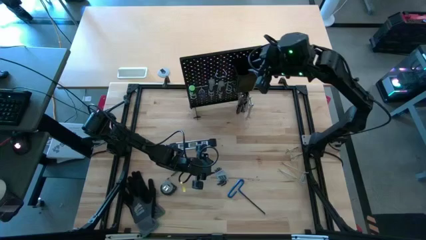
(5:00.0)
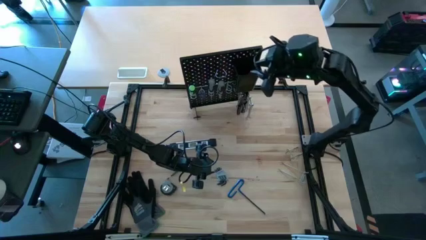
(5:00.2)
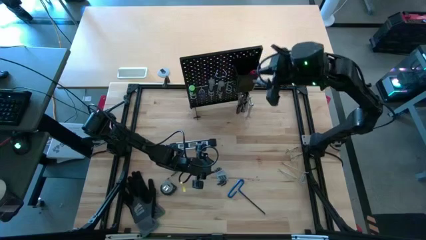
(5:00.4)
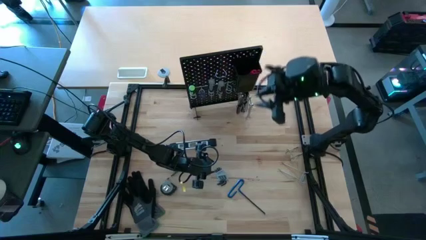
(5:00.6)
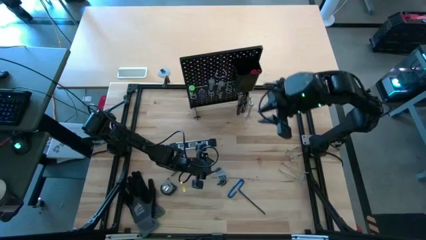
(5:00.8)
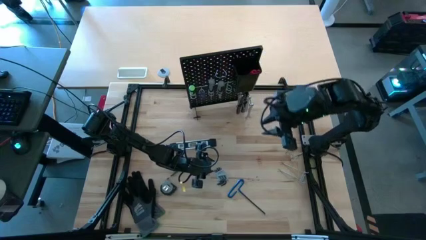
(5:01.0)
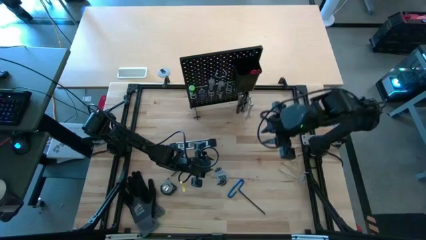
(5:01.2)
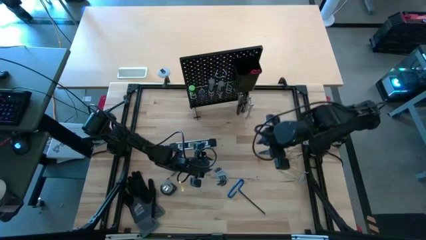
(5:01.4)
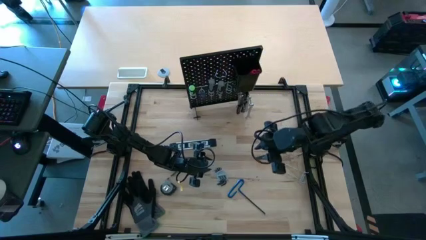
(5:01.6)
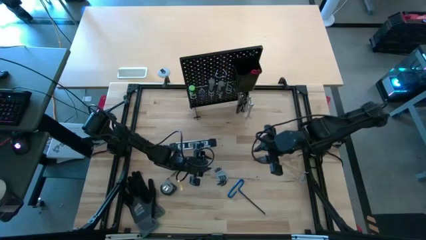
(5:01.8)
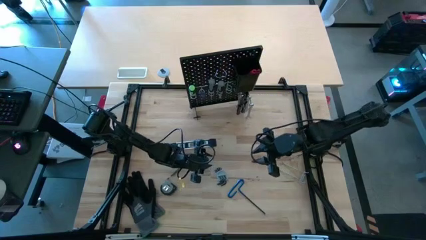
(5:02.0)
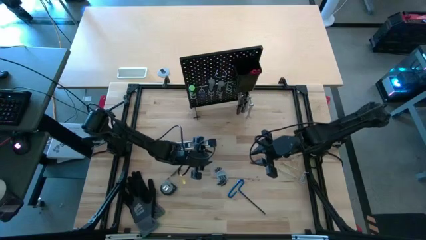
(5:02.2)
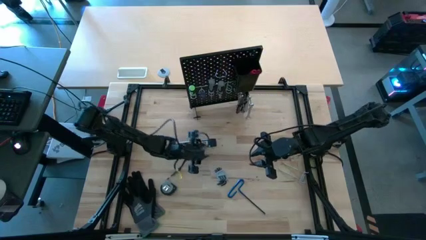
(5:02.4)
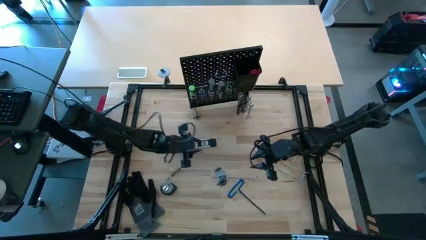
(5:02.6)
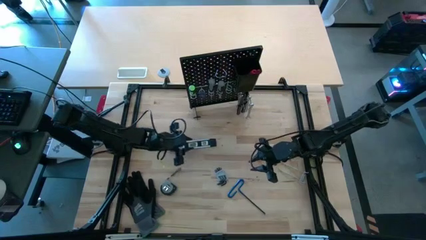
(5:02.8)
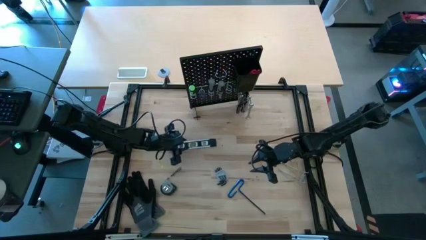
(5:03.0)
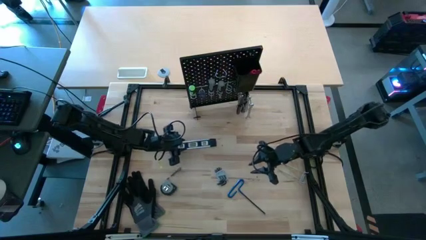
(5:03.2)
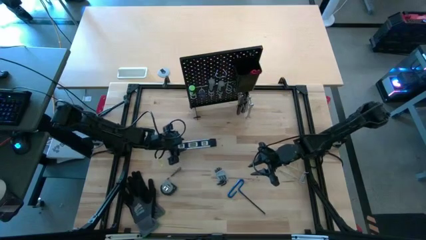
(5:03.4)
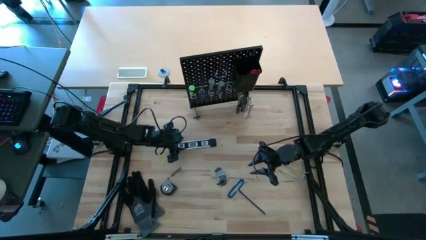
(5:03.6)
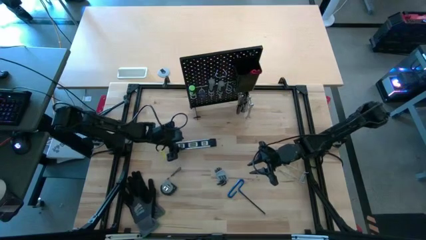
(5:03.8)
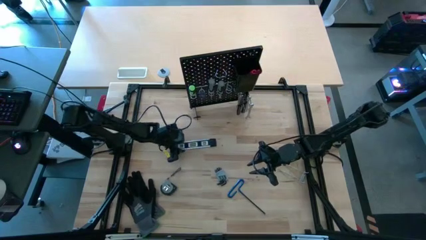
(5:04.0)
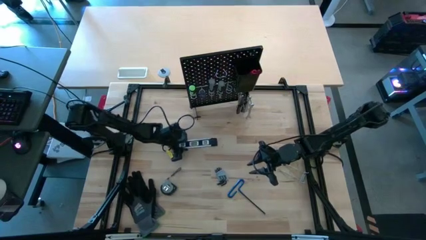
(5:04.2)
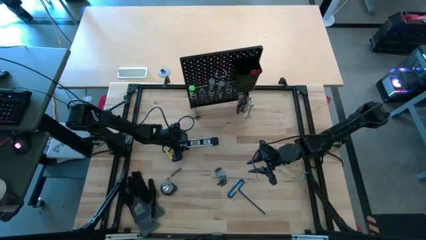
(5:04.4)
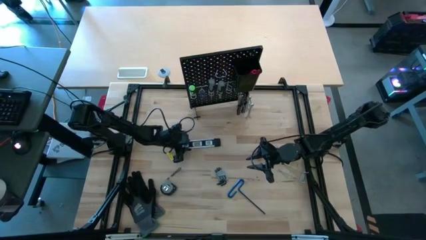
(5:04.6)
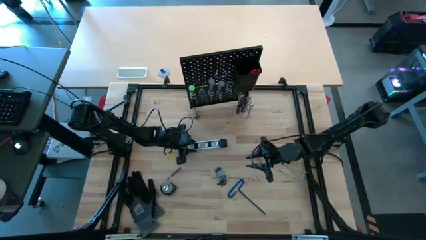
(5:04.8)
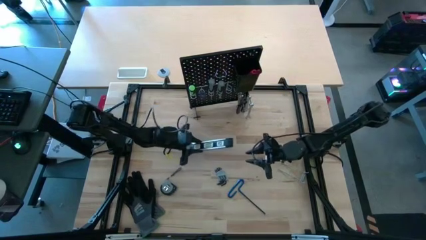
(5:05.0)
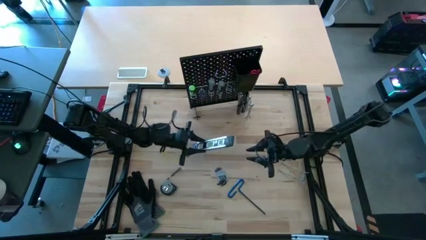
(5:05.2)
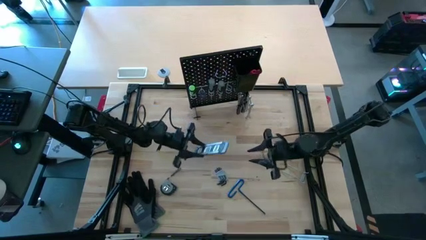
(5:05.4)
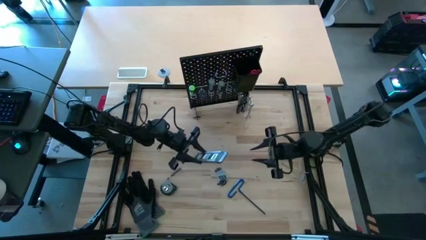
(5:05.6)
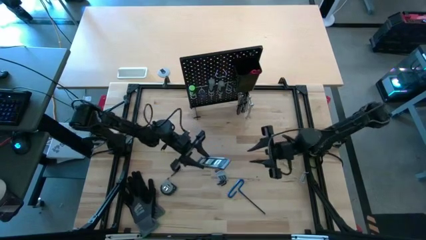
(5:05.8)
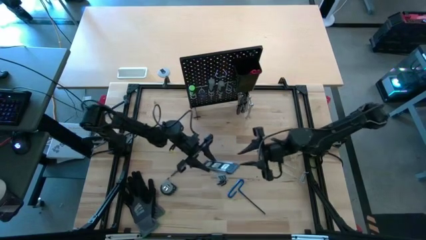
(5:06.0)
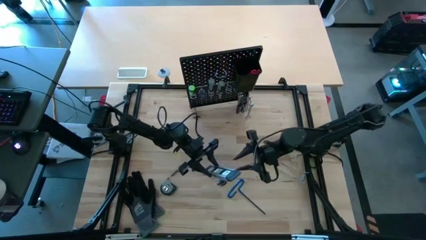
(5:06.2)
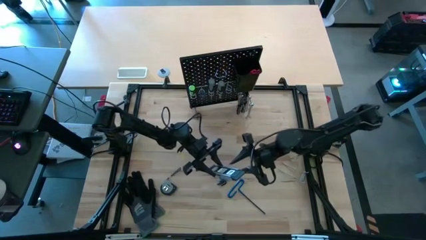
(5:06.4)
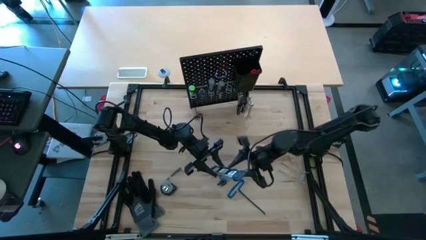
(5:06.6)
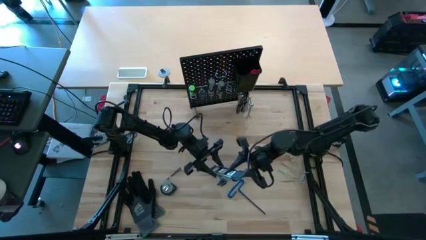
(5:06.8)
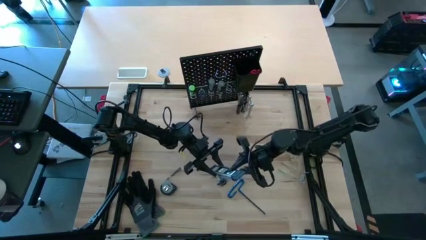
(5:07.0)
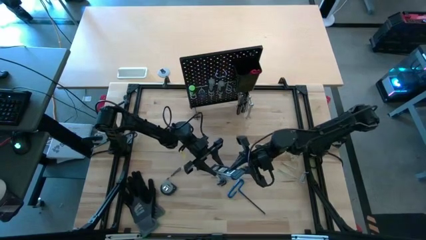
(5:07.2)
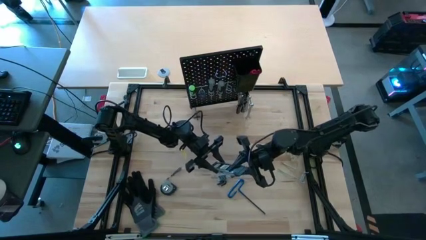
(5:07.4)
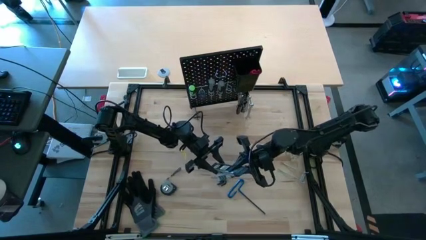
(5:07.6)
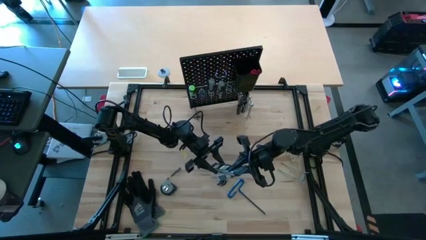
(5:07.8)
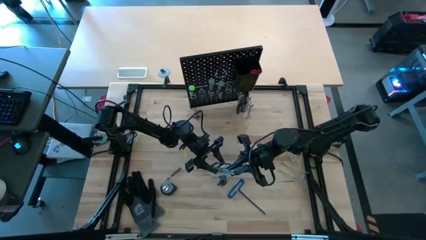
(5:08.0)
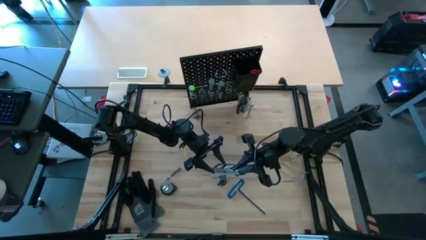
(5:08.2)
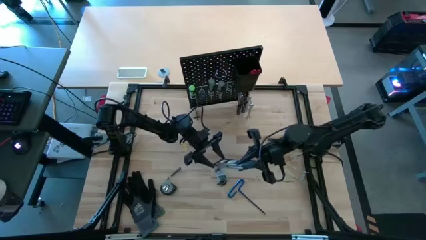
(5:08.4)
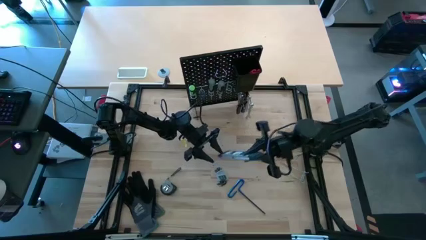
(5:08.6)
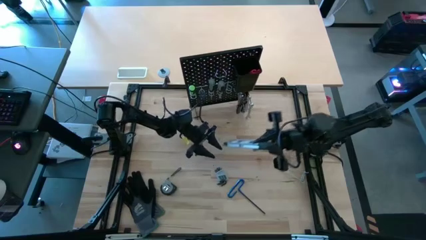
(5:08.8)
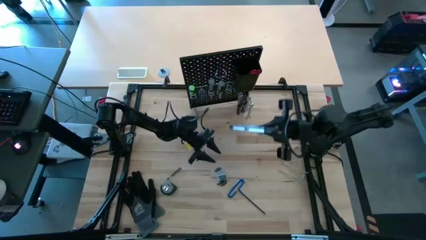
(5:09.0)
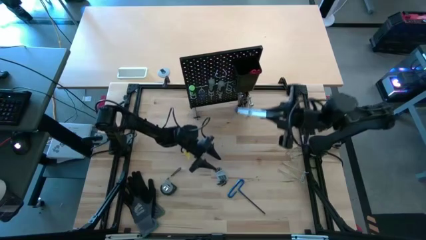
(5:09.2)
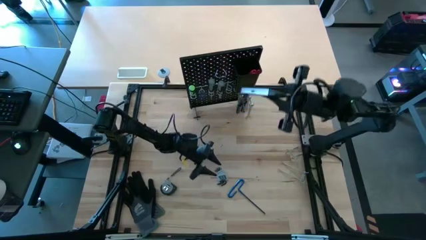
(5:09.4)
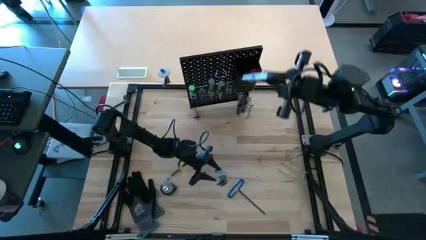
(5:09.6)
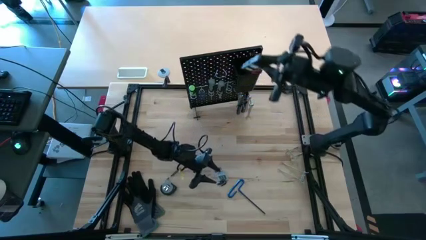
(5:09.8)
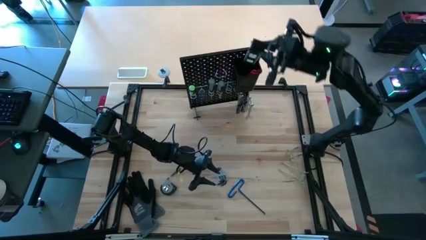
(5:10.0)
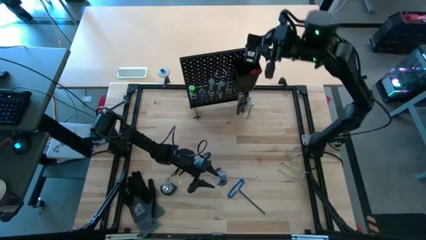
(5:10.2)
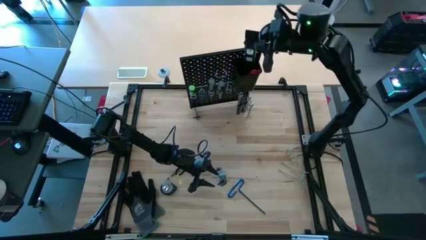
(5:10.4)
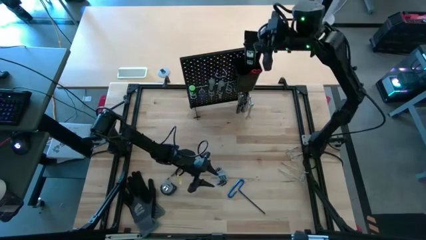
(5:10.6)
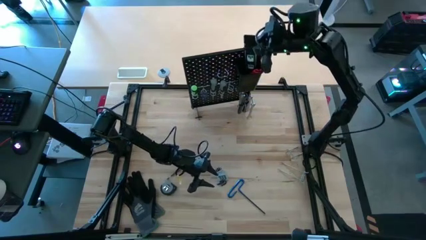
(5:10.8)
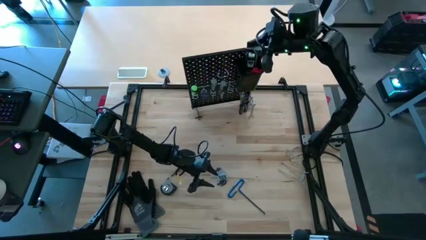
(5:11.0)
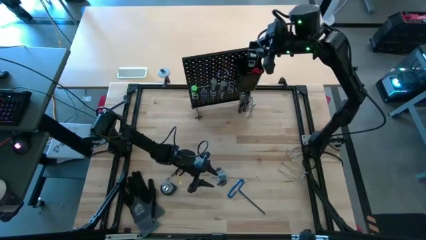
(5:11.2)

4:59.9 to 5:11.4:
Task: Hang tools onto peg board
Put the spirit level into the pegboard bin

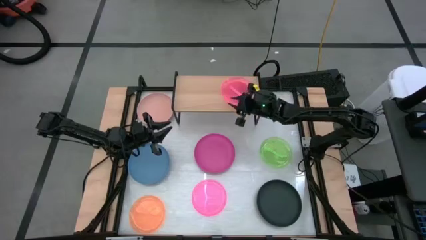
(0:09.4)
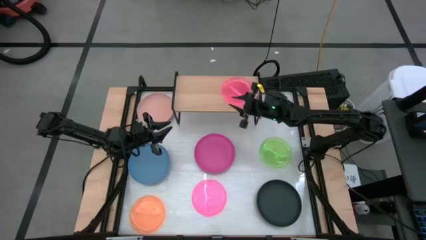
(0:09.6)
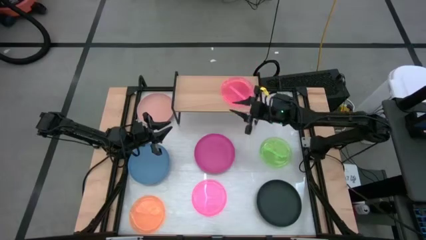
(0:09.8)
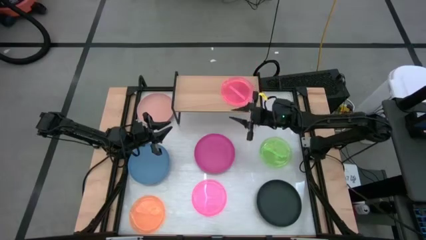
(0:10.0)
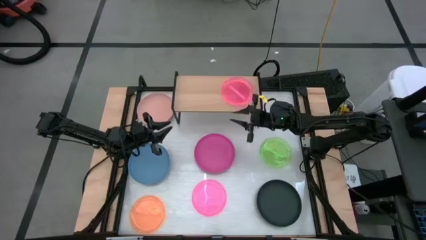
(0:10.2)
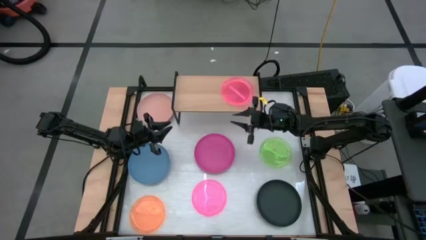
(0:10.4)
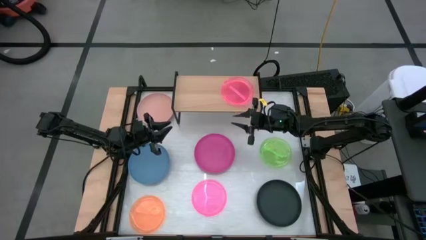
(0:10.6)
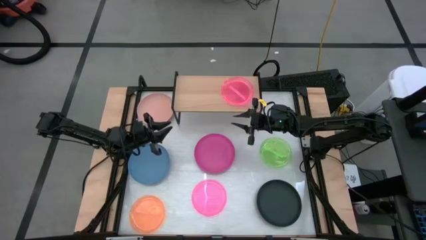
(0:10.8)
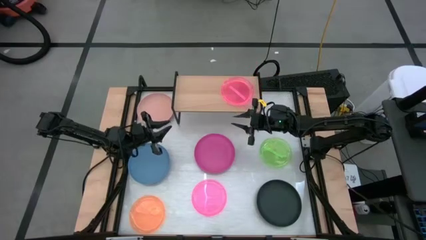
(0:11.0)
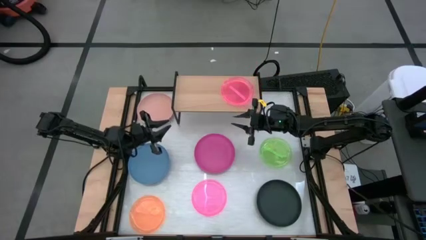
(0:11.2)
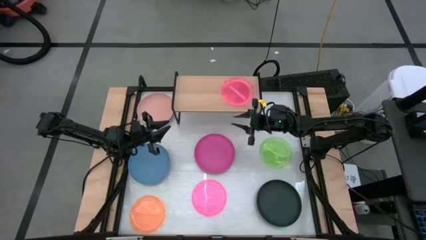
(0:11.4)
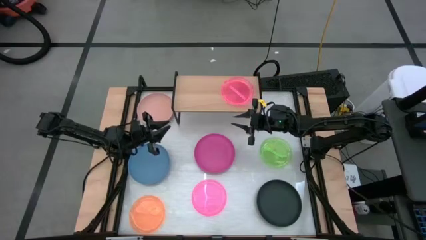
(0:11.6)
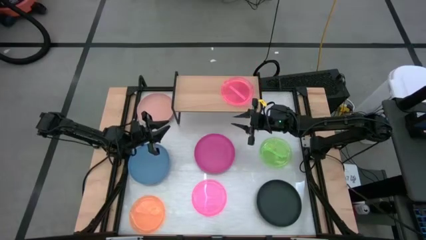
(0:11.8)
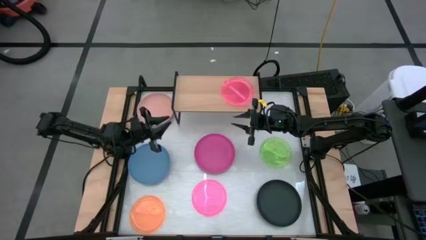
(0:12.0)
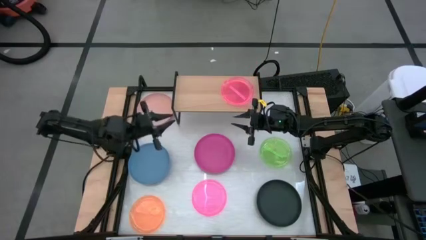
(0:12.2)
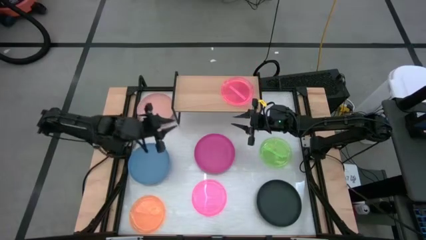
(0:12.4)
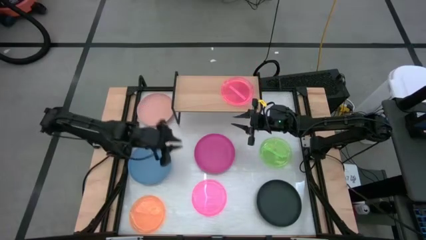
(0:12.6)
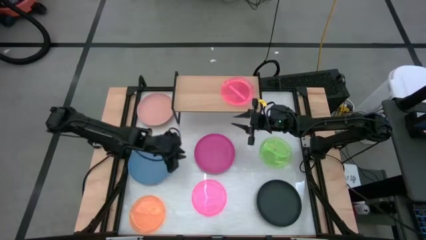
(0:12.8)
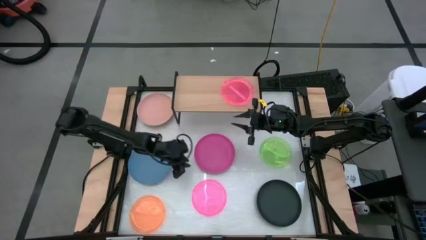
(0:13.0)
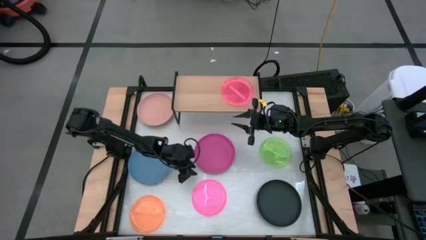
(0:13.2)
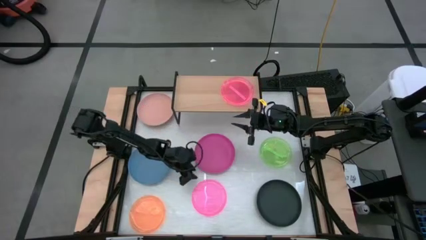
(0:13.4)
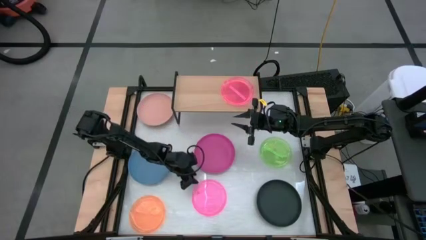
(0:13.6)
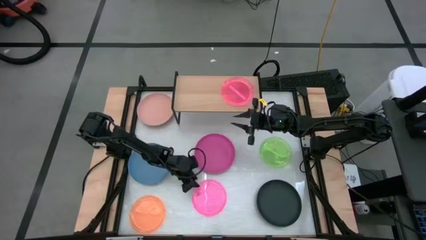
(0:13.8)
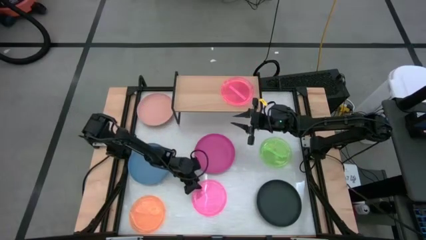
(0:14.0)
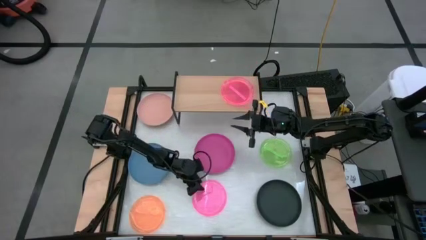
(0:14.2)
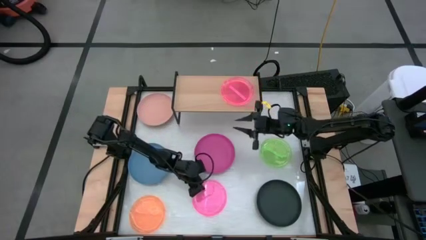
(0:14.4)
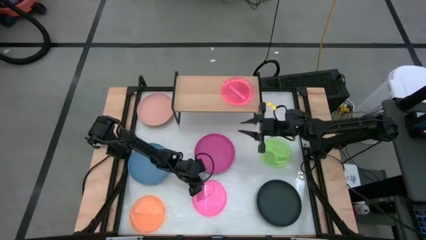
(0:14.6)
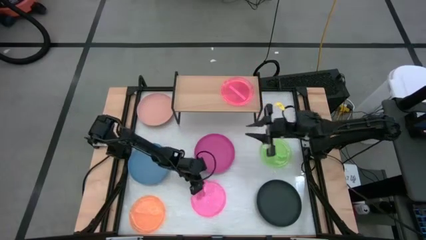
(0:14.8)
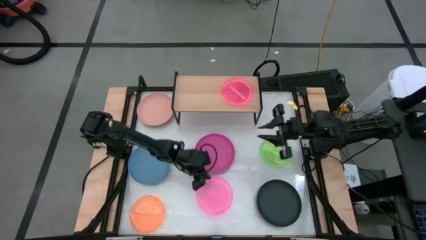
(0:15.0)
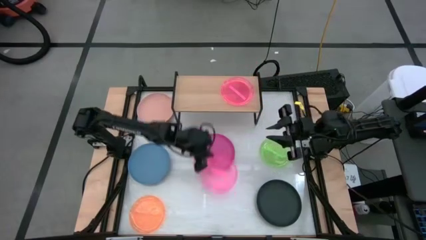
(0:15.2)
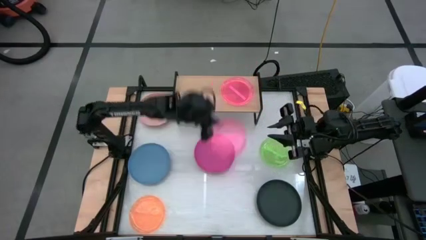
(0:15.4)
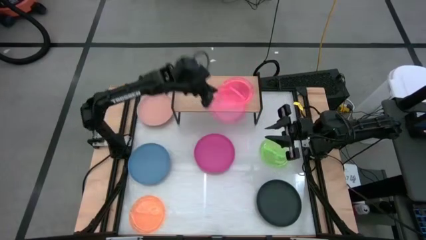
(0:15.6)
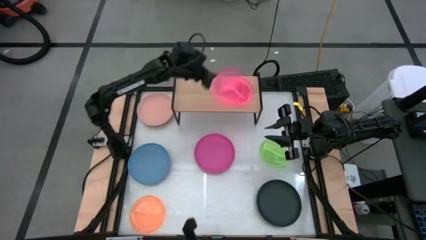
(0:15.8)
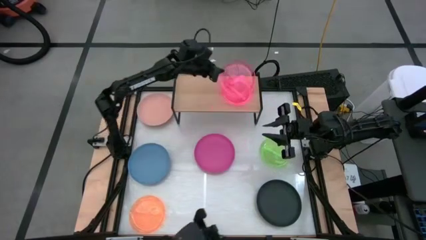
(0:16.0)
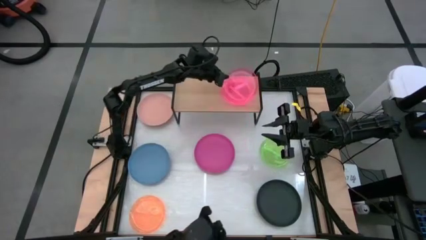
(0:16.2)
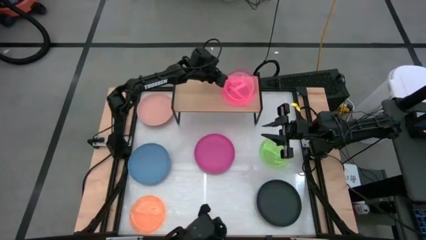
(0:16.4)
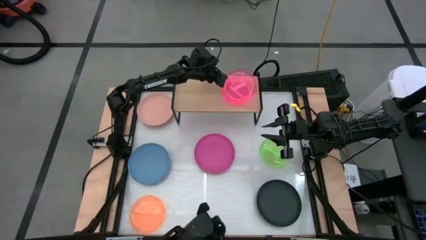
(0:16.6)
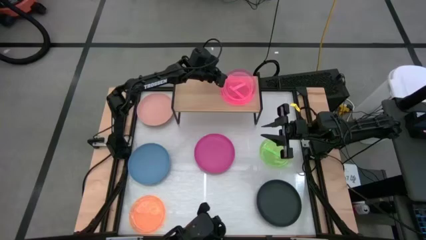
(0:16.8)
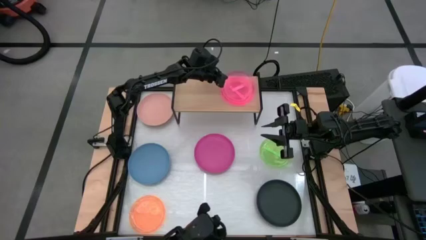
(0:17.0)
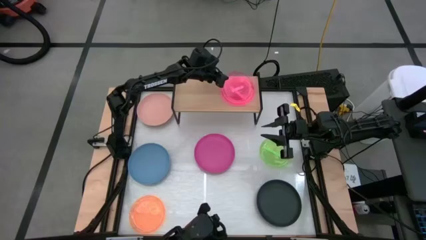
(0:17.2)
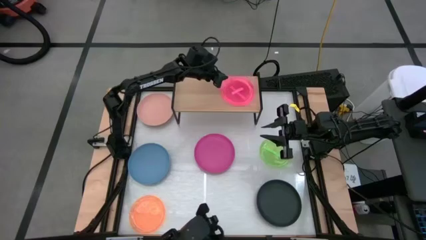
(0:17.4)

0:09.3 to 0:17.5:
Task: Place and stack plates onto a shelf
Stack the bottom pink plate on top of the pink plate on the shelf
